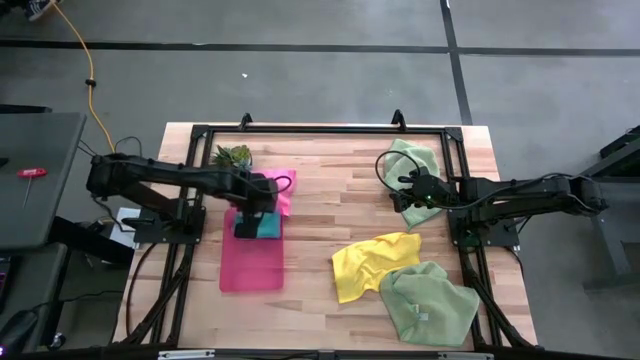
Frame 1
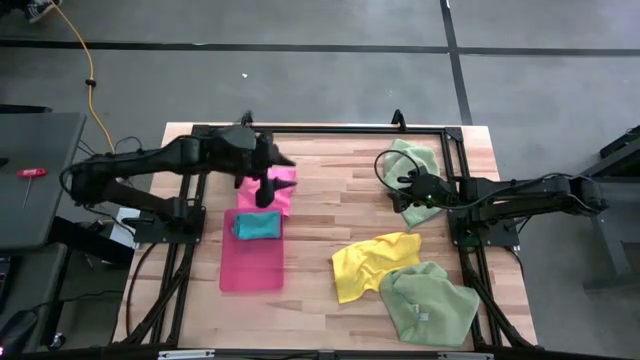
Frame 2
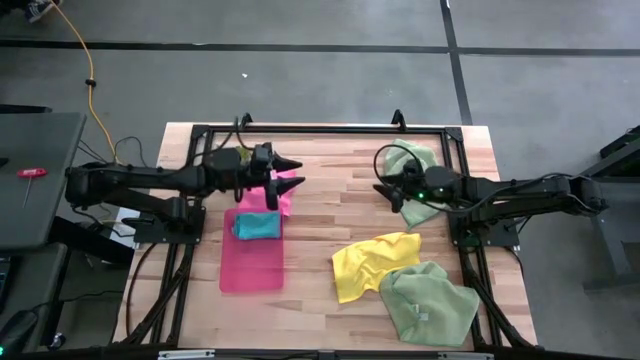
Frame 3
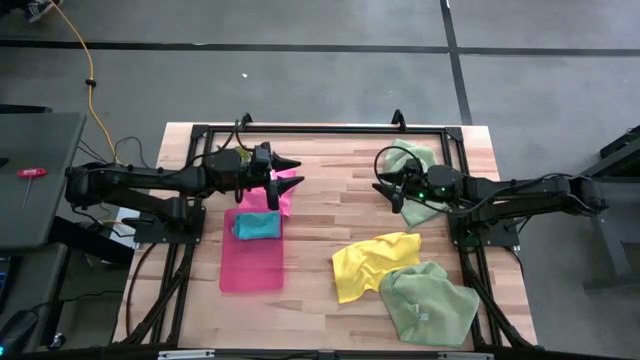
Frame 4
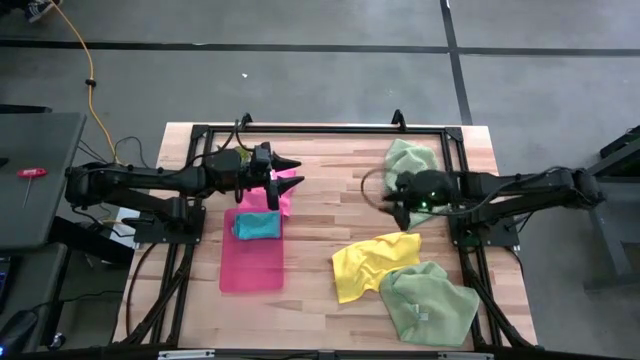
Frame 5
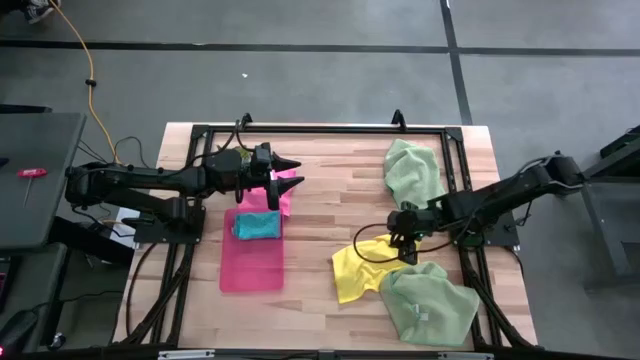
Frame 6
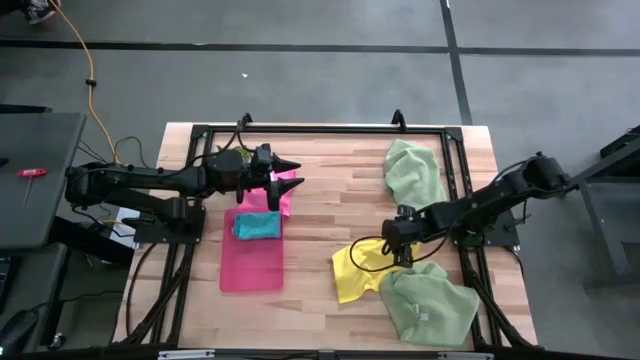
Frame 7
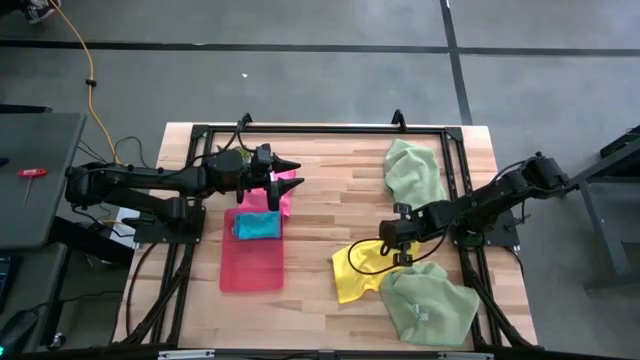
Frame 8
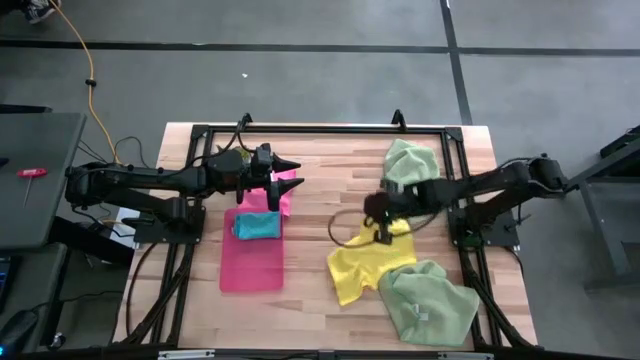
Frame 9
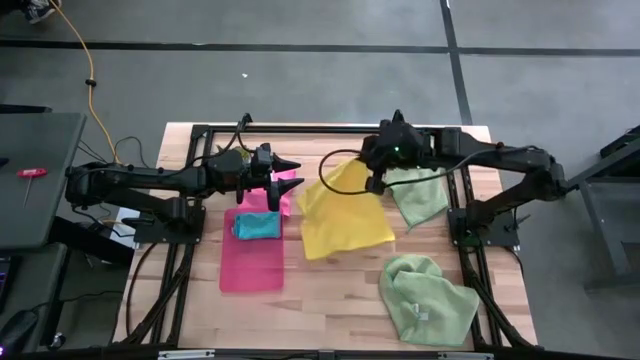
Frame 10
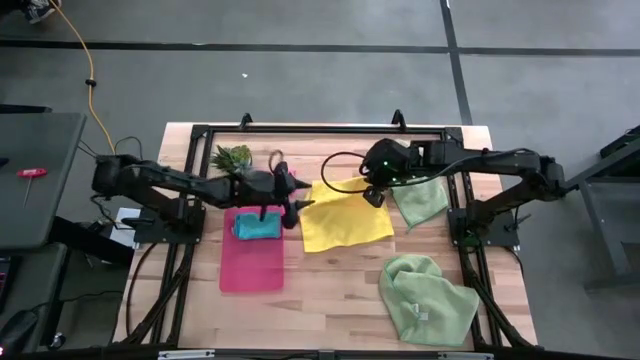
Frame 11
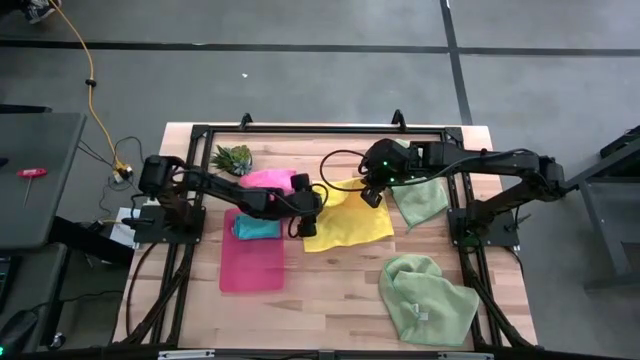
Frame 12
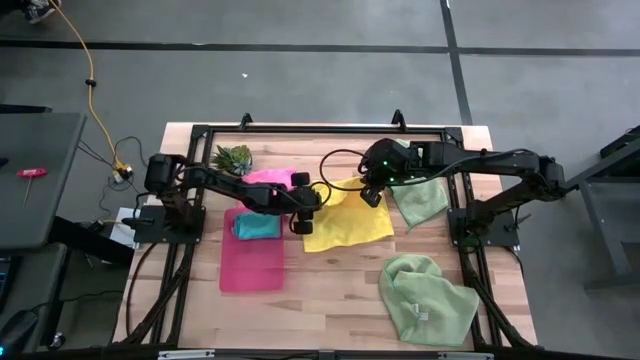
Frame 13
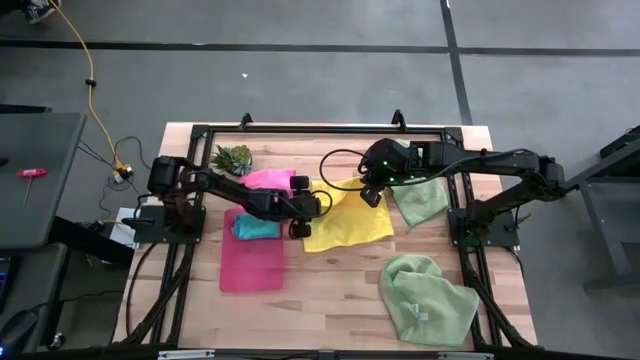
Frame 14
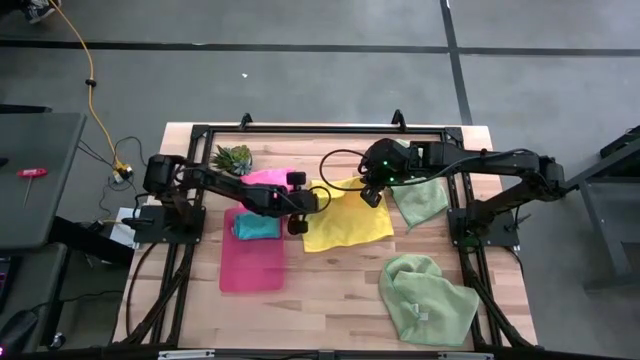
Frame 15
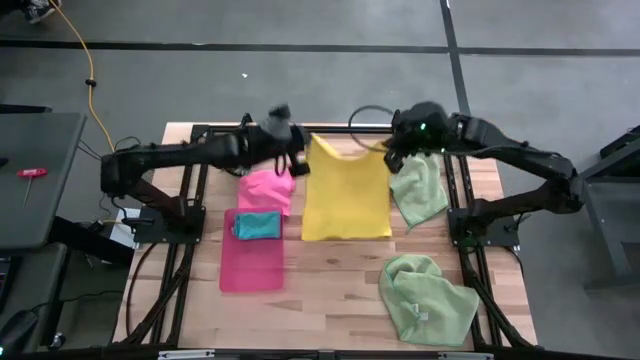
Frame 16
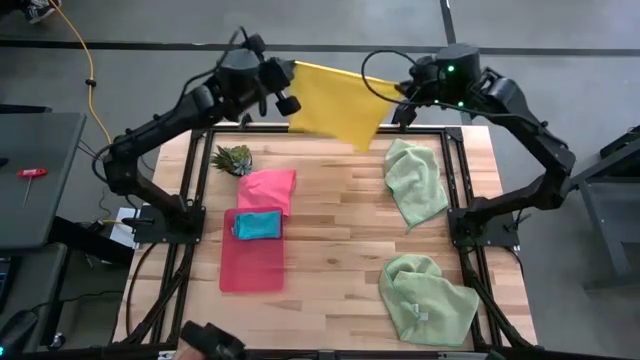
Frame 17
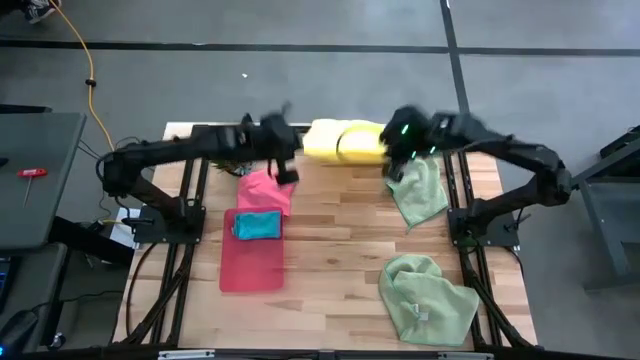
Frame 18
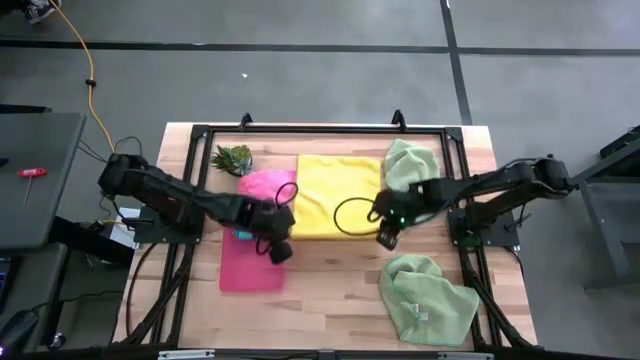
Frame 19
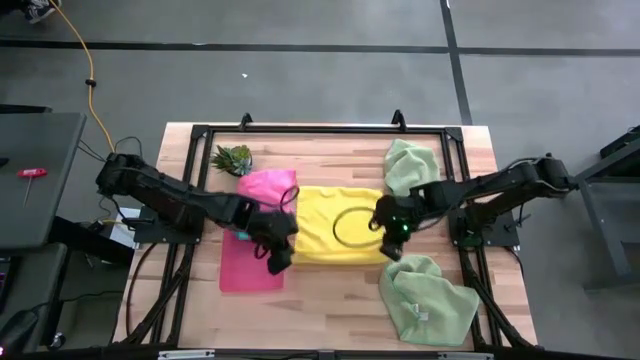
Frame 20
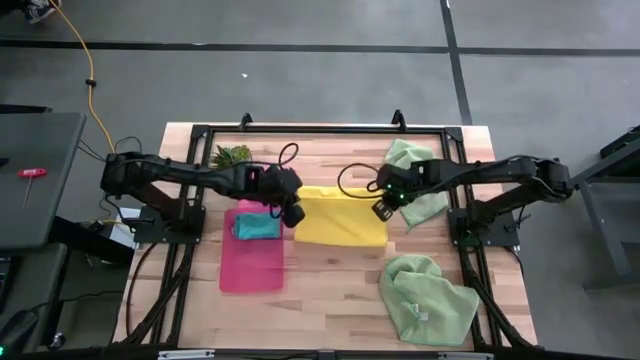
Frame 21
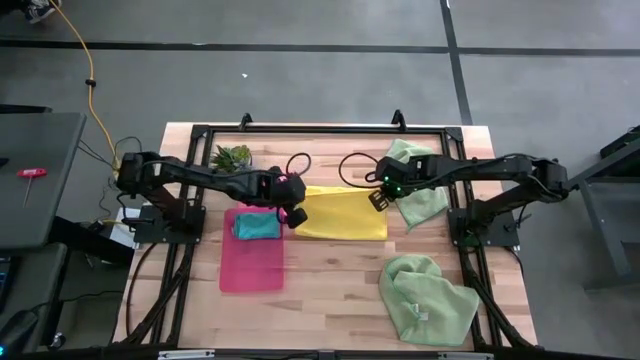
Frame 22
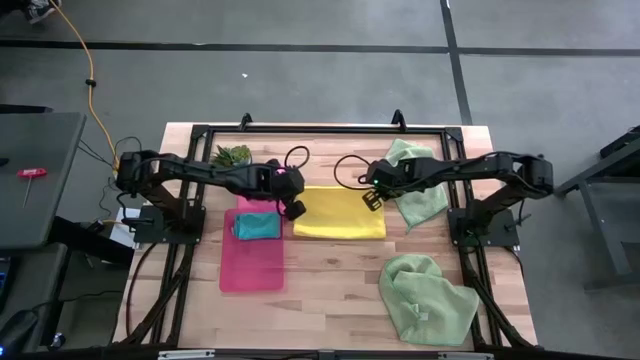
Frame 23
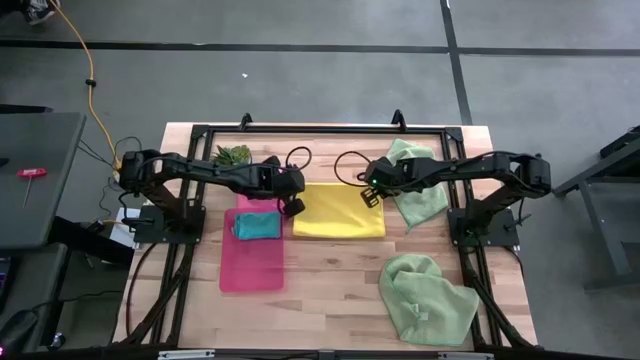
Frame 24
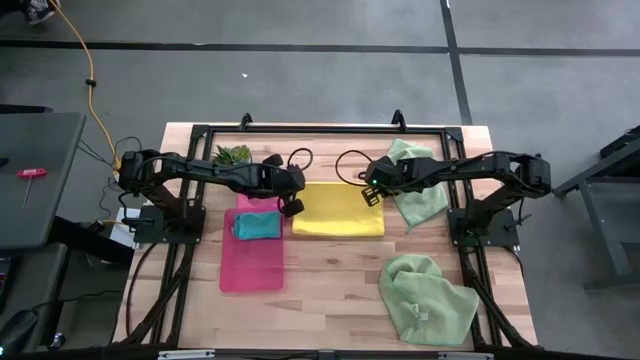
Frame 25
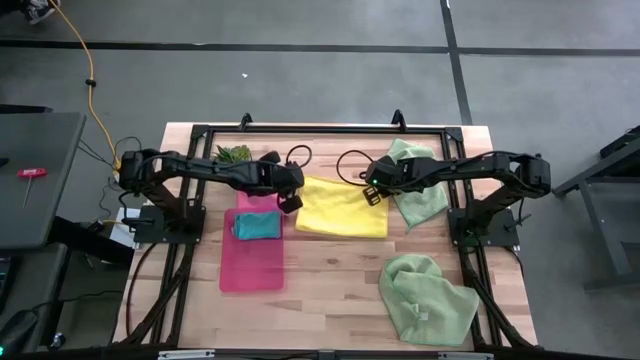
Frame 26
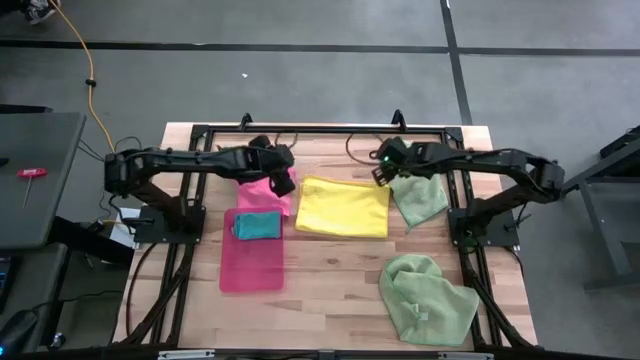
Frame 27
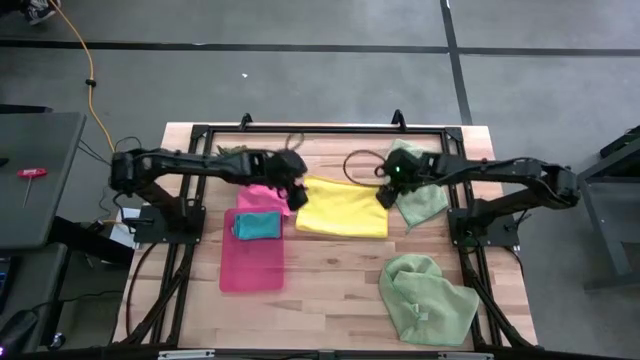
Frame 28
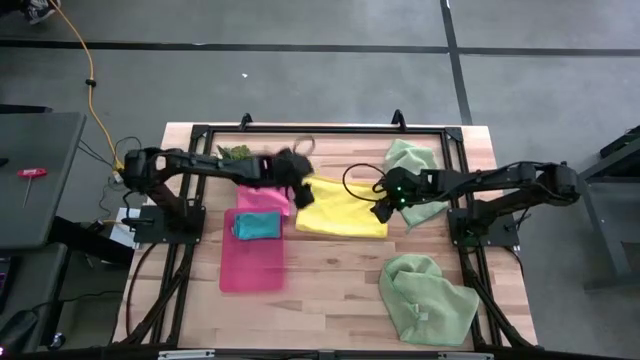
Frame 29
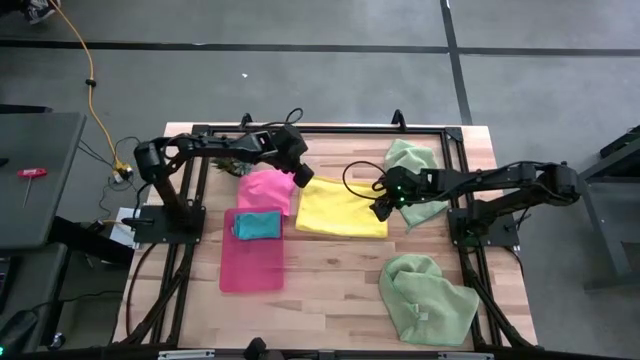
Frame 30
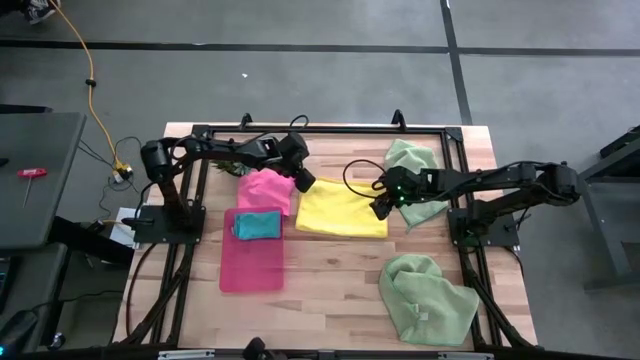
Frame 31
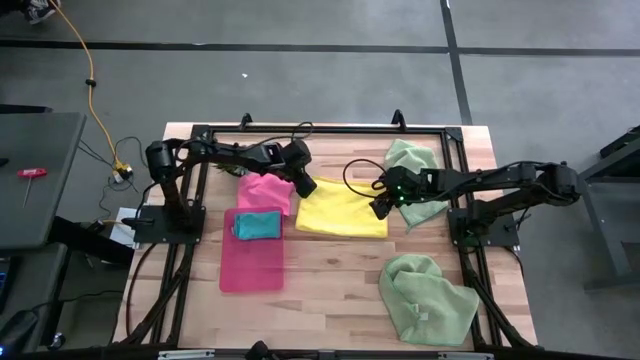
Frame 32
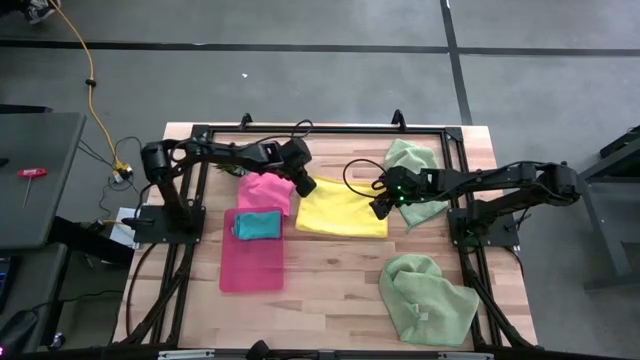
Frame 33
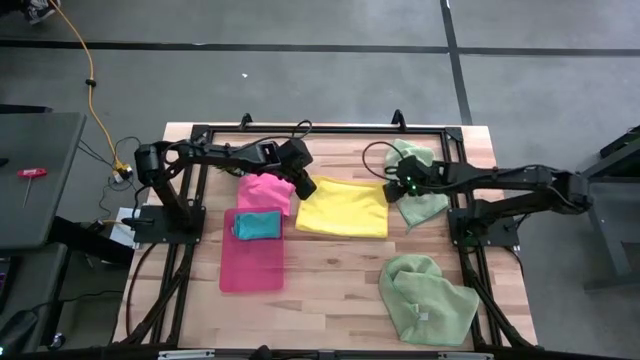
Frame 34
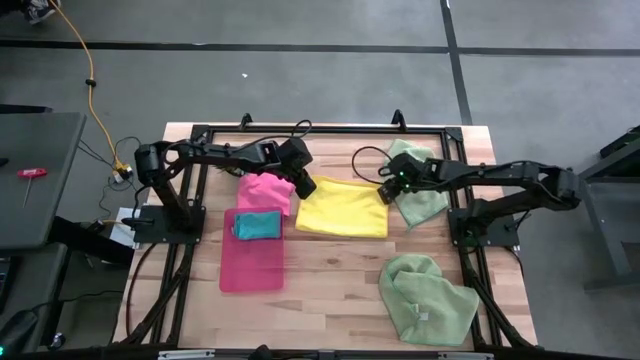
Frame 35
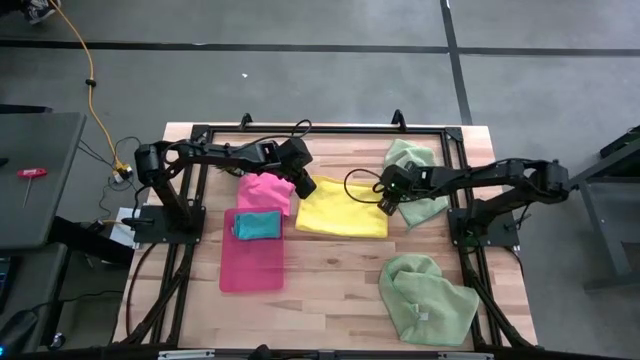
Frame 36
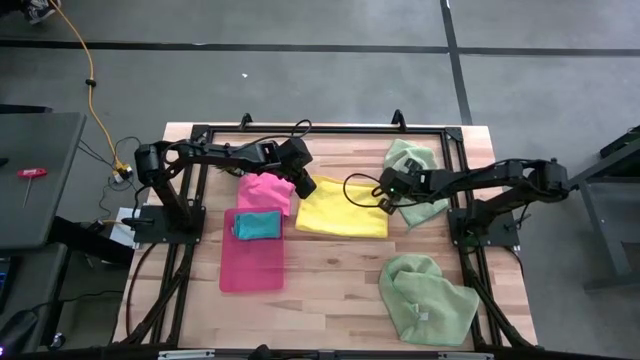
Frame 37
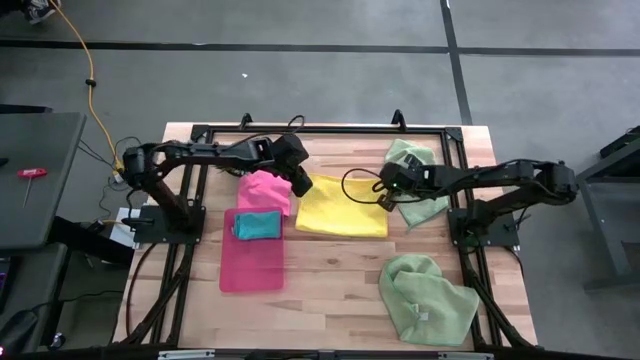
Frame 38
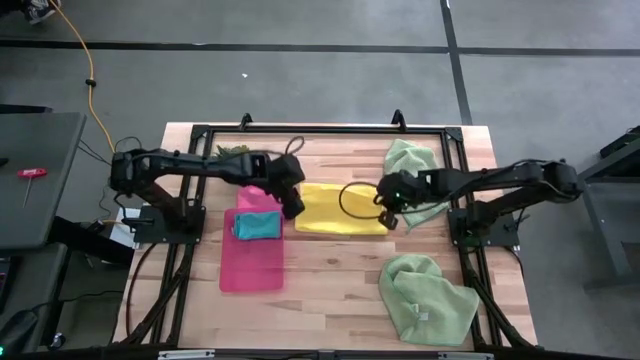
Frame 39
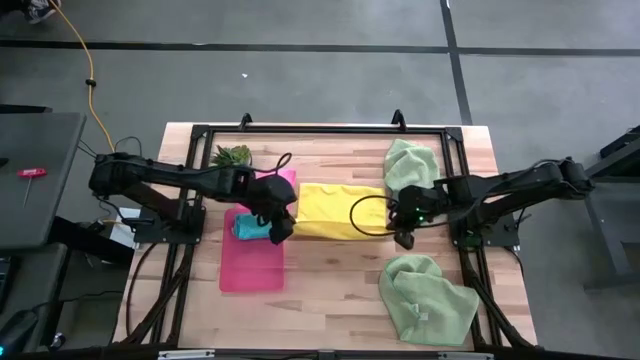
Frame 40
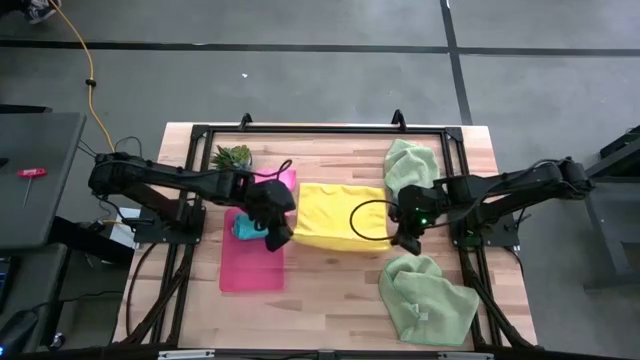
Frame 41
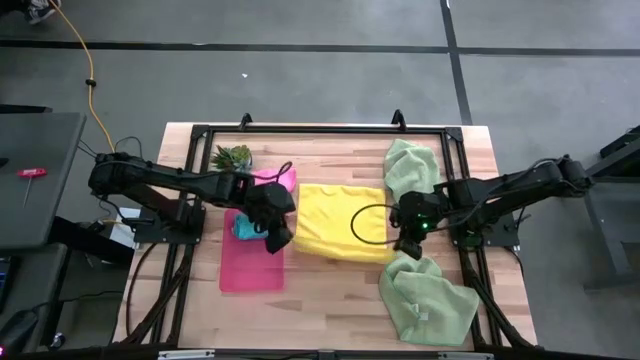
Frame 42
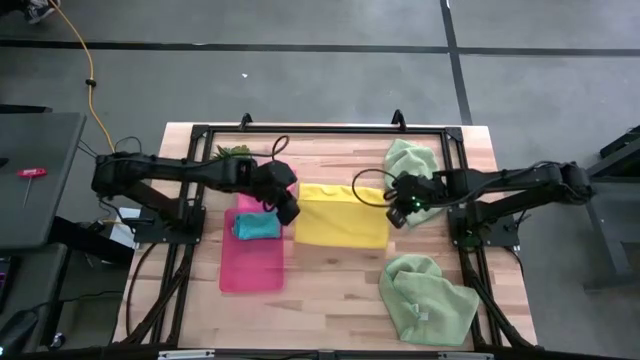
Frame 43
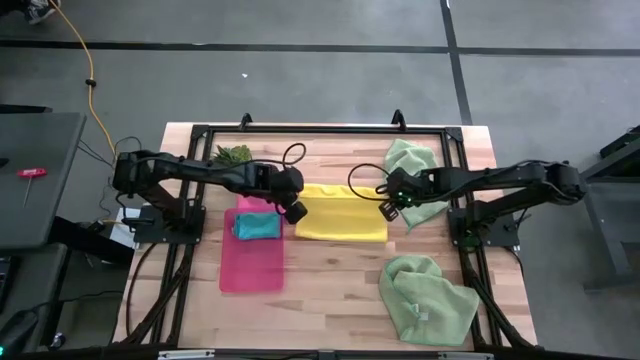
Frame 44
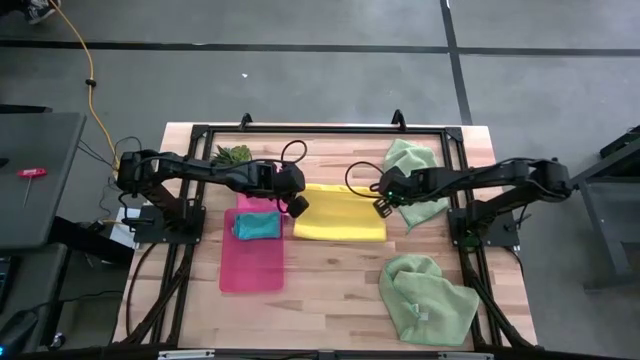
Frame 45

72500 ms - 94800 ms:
Task: Fold microfiber towels
Fold the yellow microfiber towel
